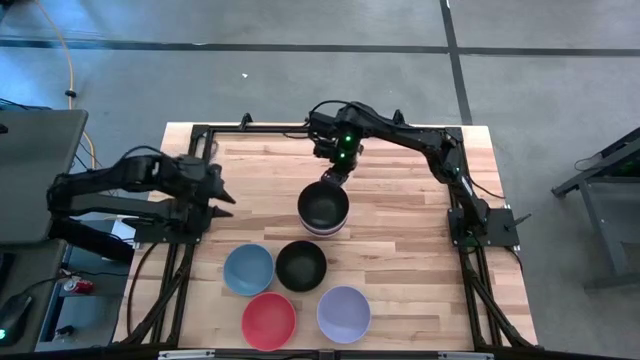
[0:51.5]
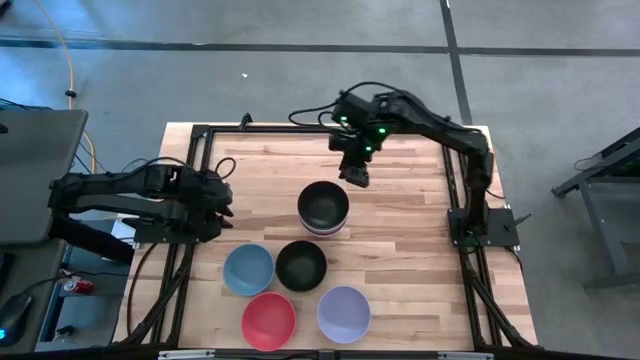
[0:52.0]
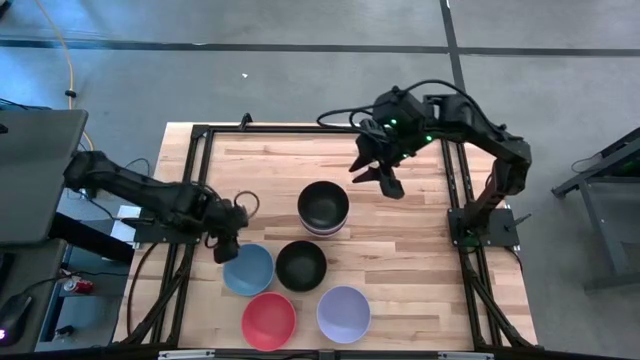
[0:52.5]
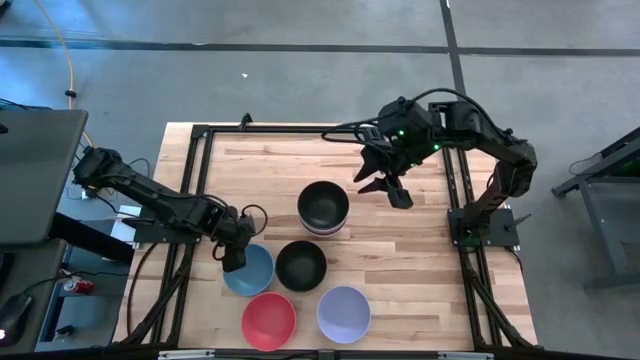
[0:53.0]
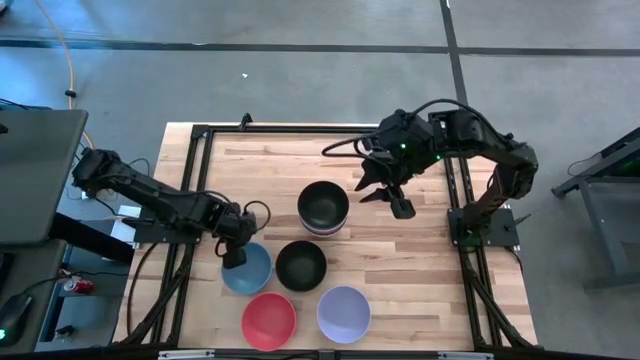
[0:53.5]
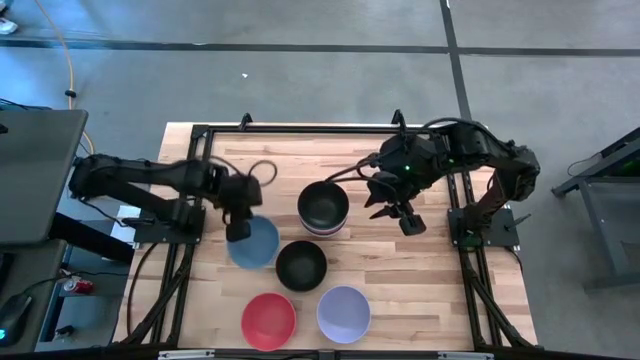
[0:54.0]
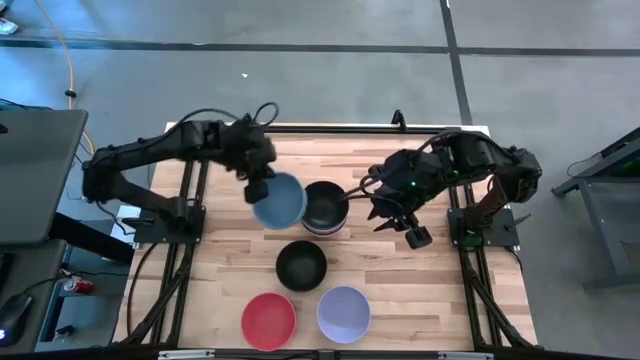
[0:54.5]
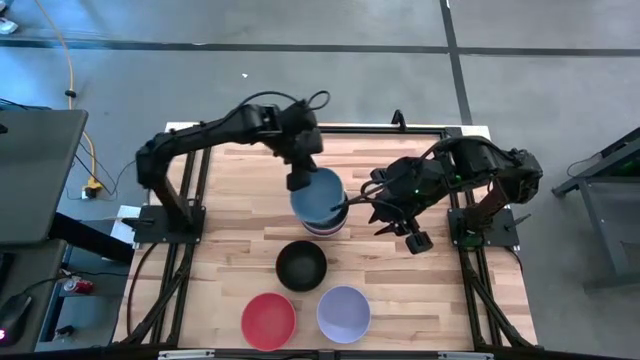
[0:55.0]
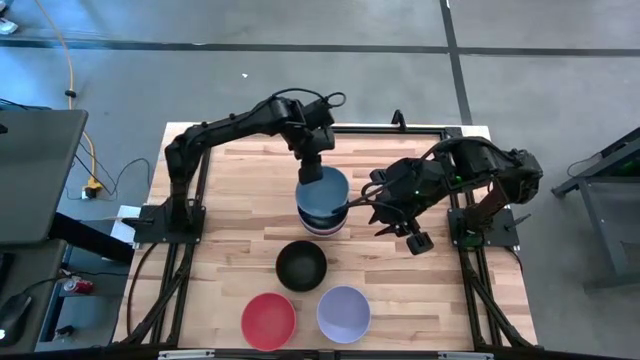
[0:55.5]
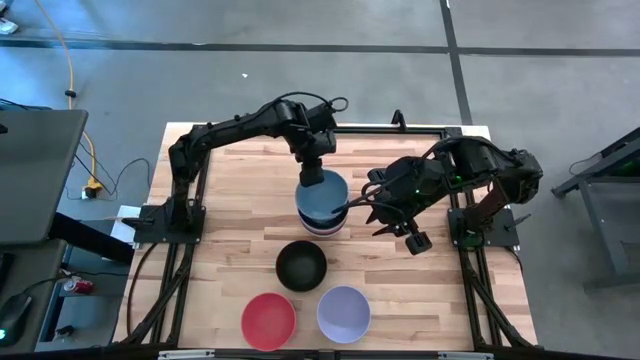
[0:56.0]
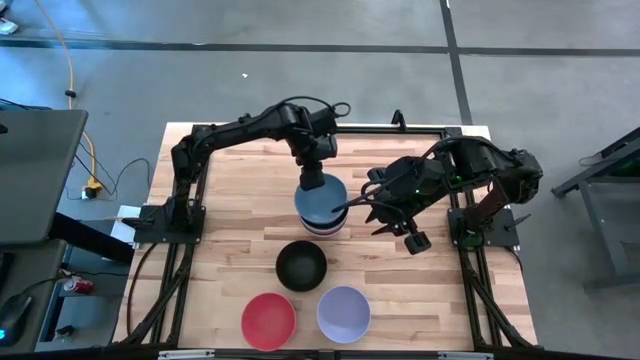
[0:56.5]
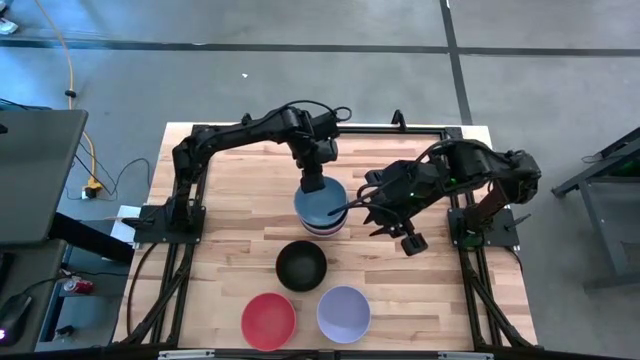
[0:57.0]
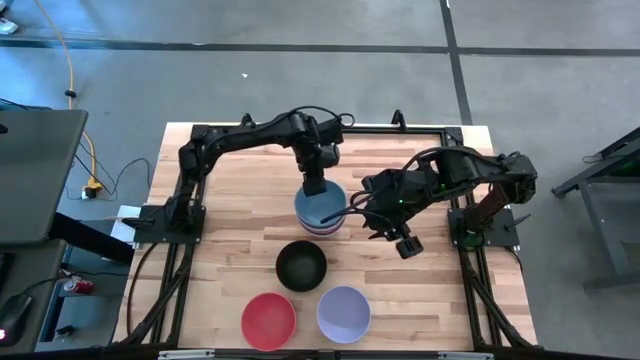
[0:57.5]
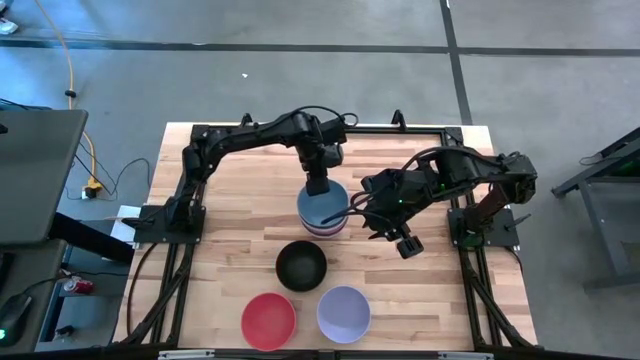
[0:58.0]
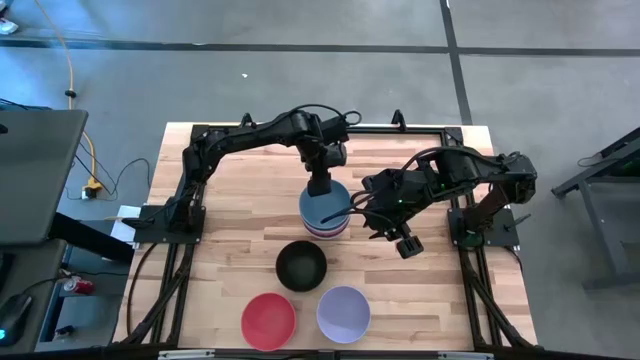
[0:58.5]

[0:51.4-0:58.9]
Task: Nest bowls inside each other
Stack the blue bowl on top of the black bowl

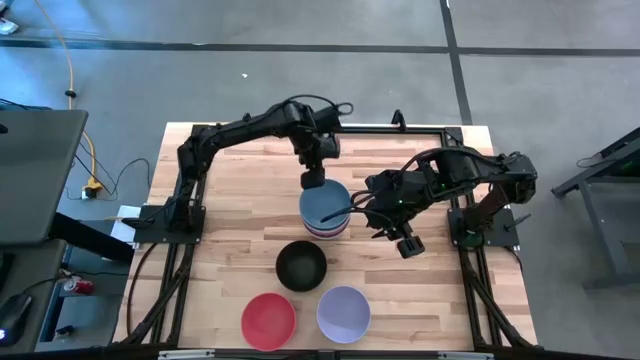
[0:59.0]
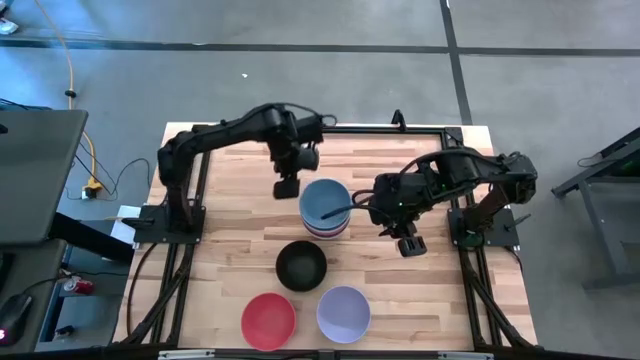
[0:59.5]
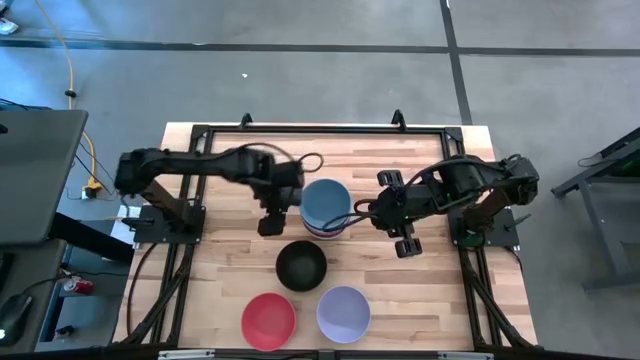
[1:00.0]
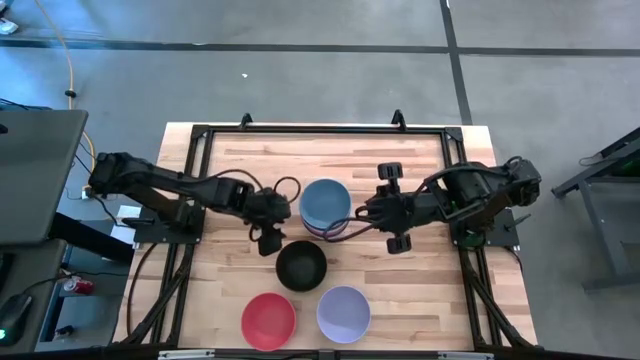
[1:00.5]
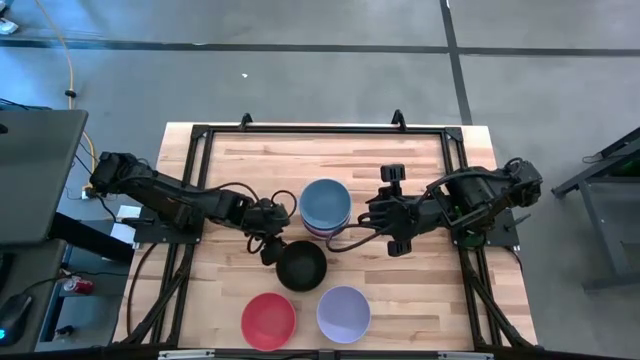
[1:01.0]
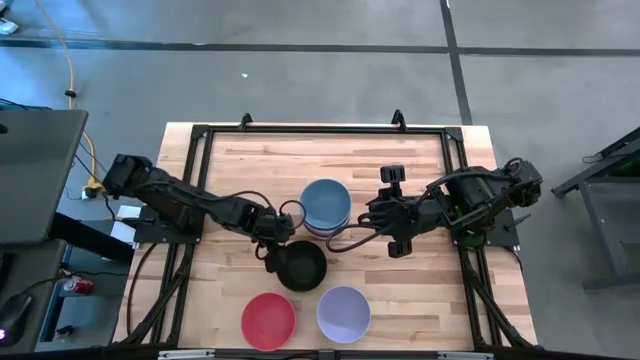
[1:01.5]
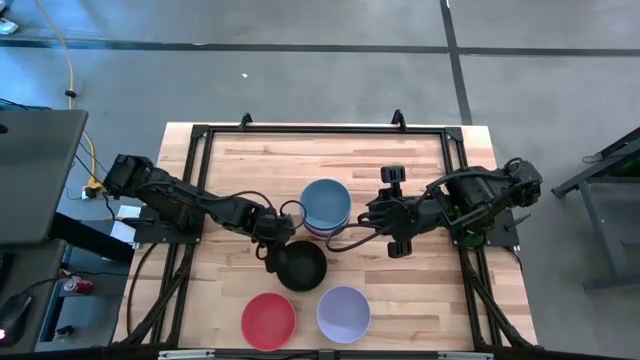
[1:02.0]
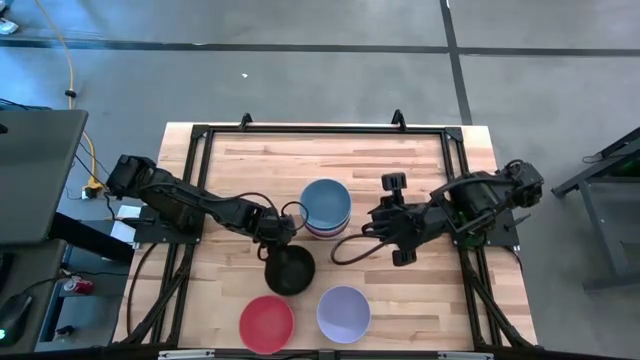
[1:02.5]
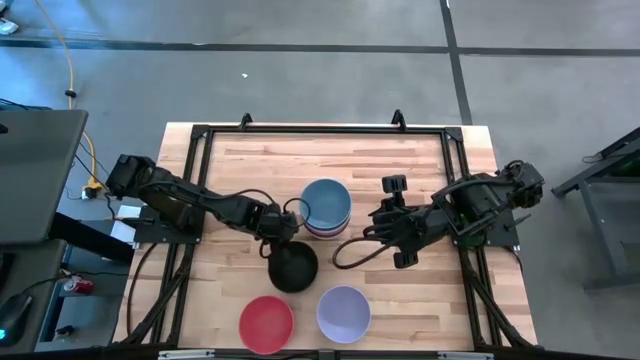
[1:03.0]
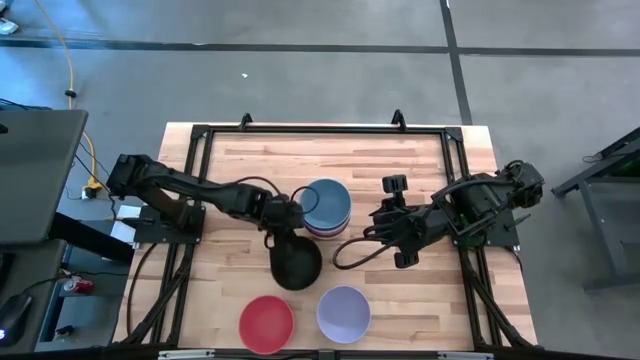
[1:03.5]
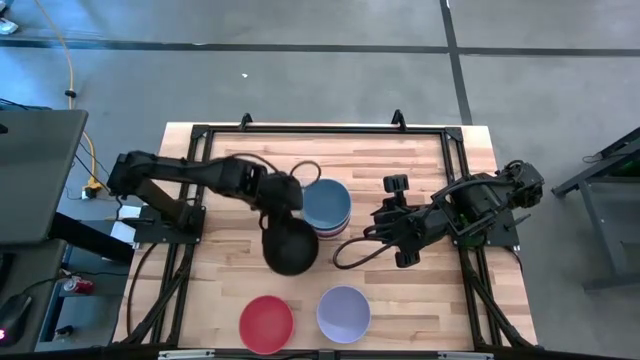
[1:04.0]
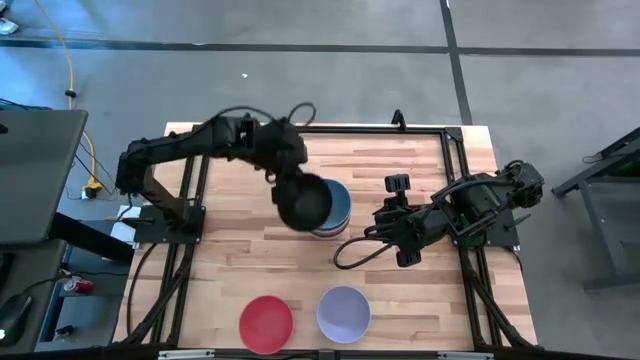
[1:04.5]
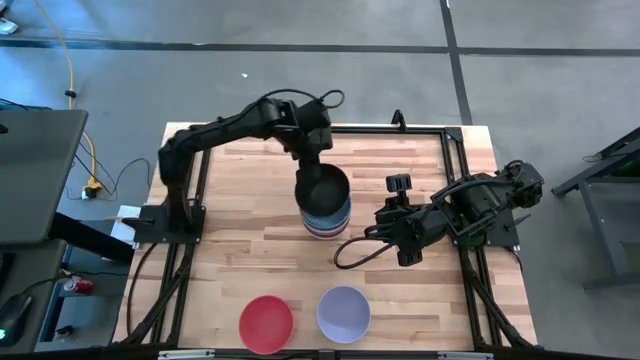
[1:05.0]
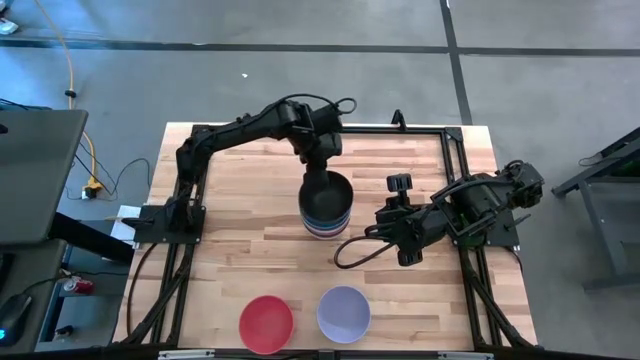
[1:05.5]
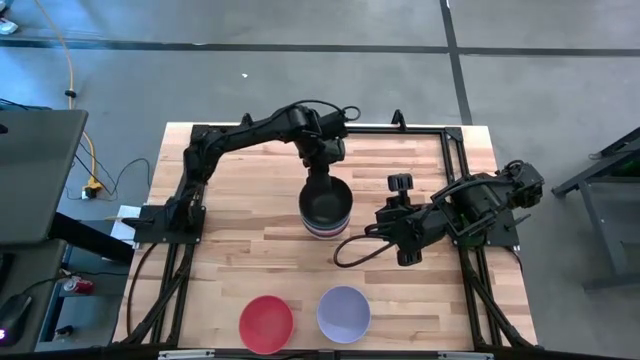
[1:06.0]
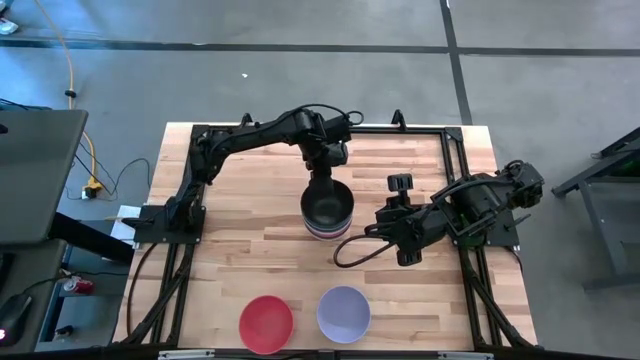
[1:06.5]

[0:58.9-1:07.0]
Stack the black bowl on top of the blue bowl

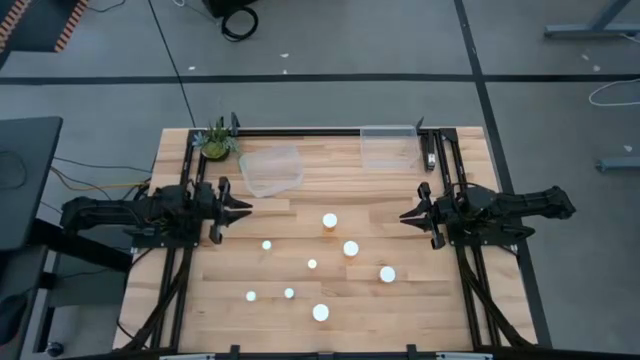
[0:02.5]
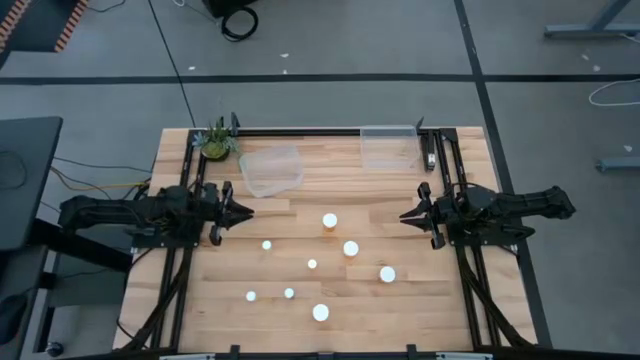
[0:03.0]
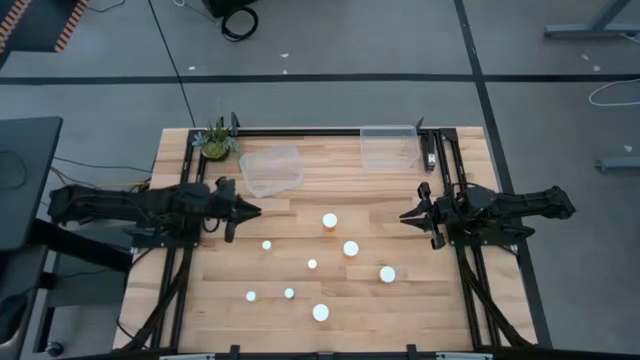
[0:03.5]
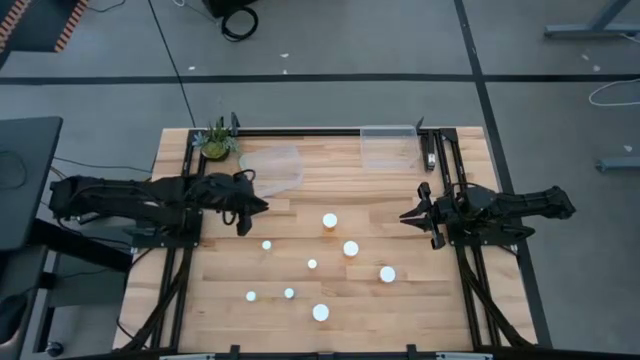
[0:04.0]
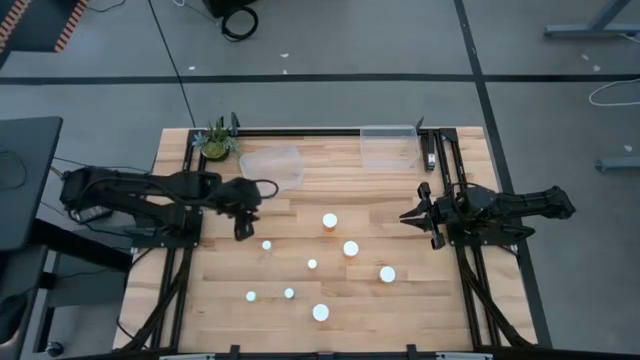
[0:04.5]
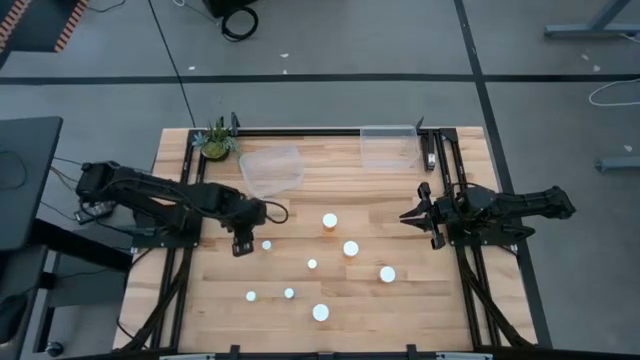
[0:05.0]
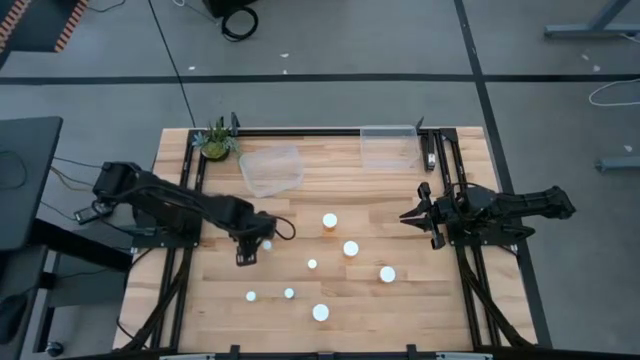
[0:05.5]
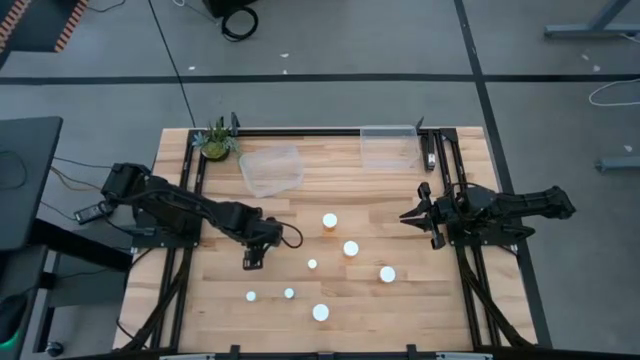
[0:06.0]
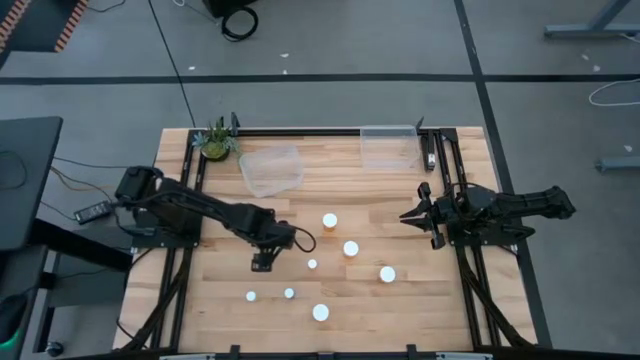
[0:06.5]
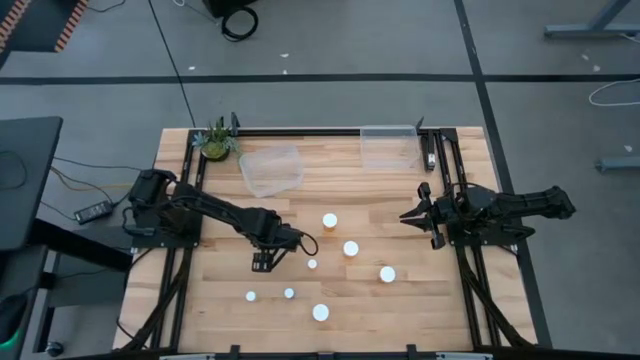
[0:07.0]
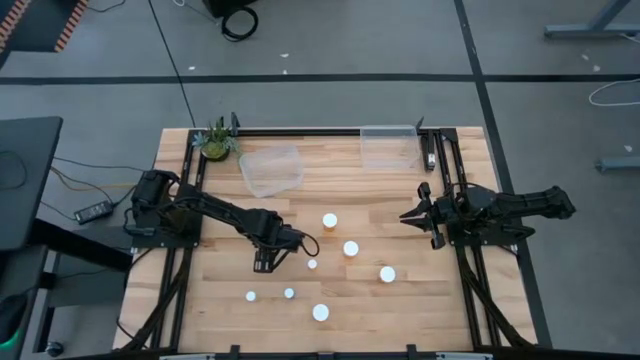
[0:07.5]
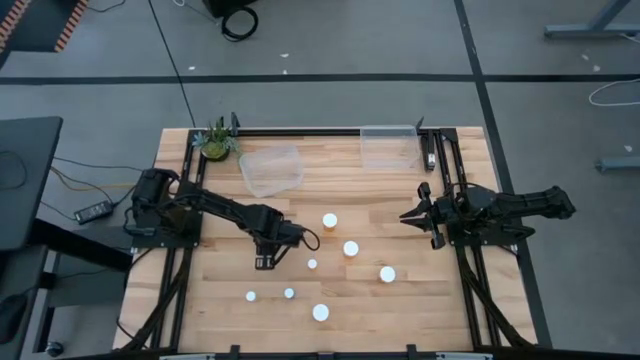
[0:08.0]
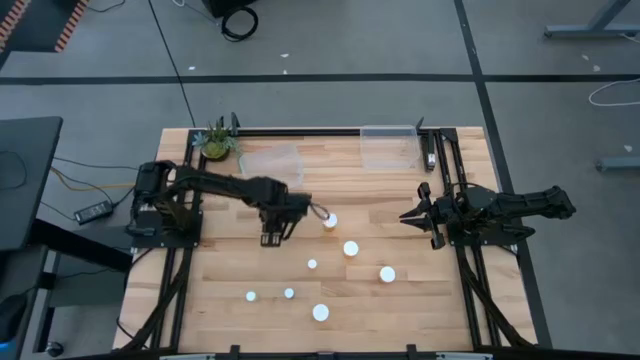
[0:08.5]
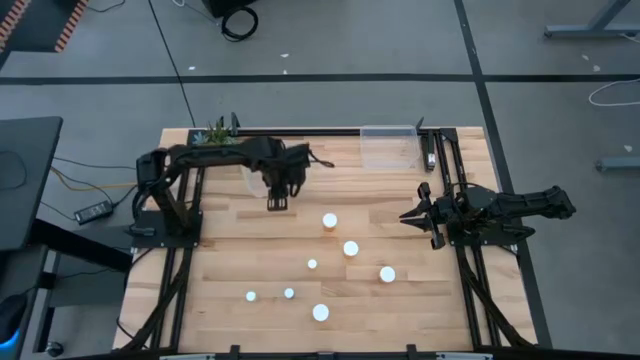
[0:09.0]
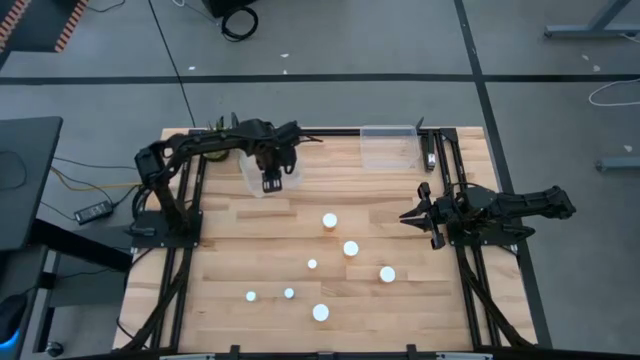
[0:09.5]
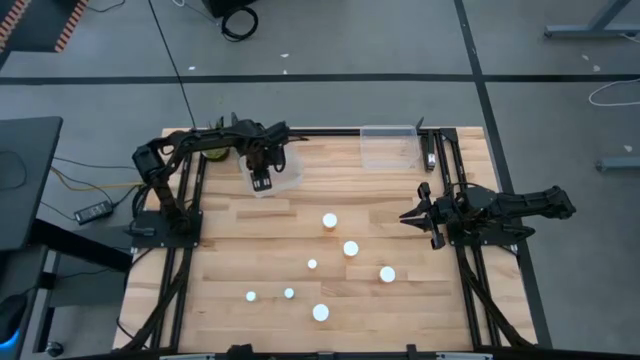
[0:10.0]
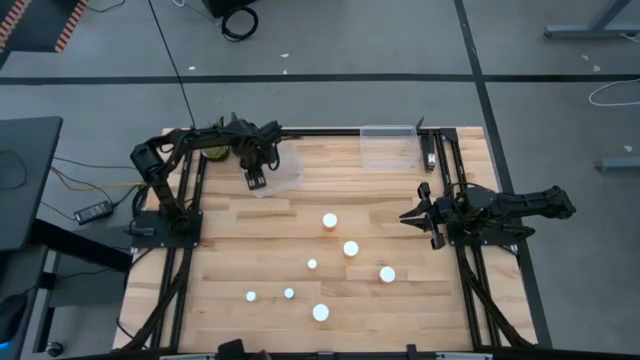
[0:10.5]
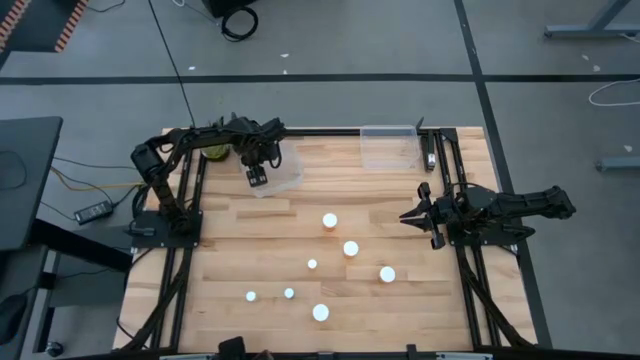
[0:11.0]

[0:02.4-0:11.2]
Task: Pick and place medicine bottles into bin by pill shape (circle, oval)
Put the small yellow pill bottle into the left transparent bin
